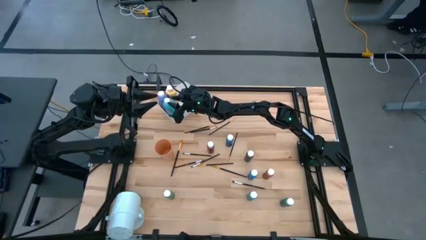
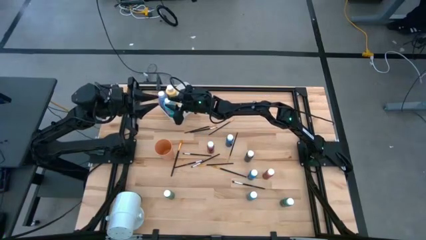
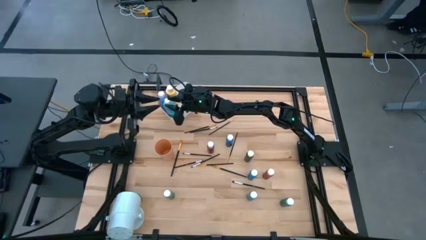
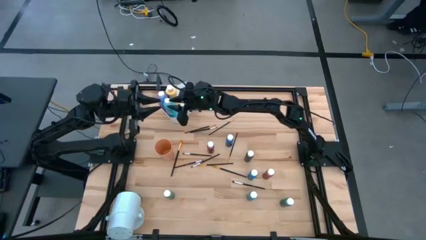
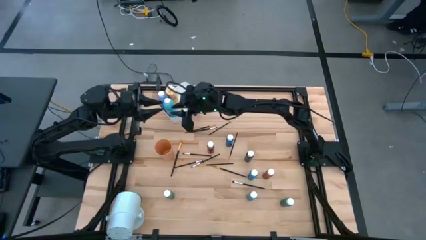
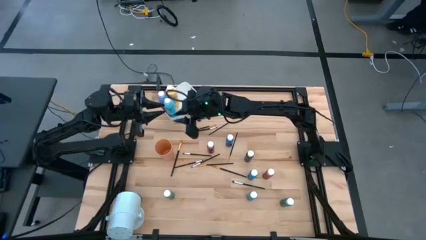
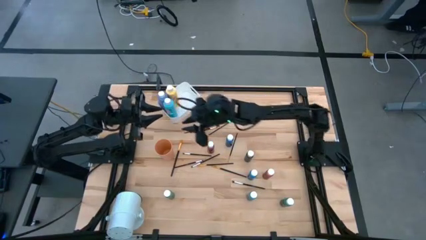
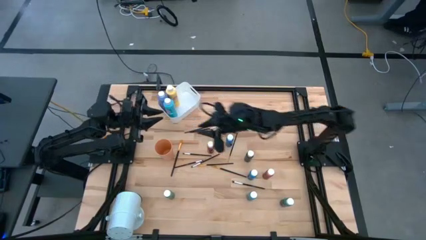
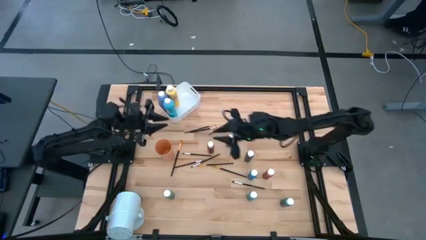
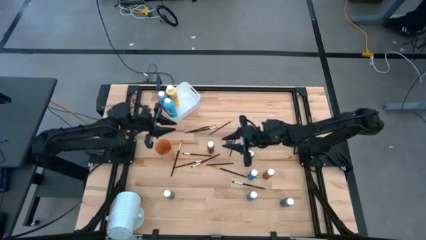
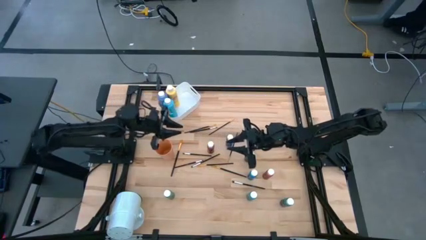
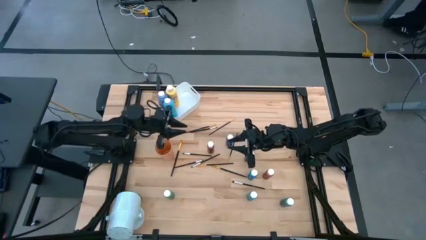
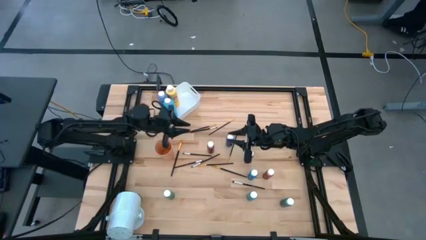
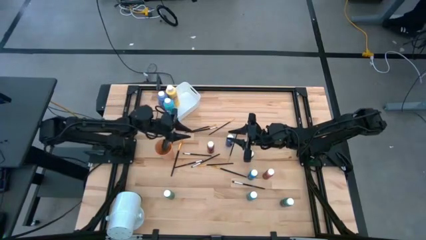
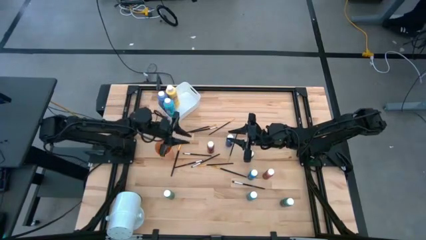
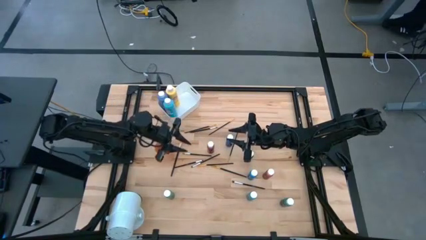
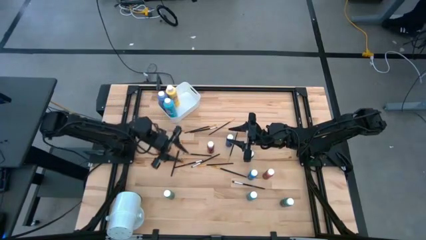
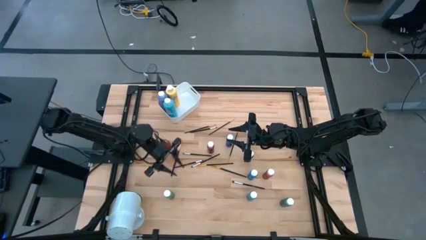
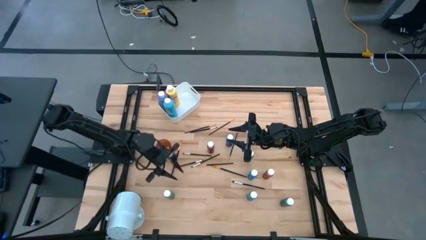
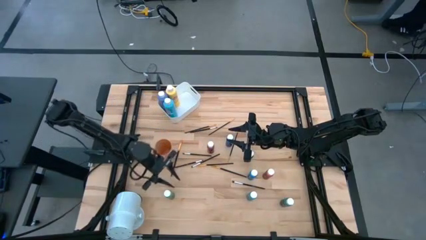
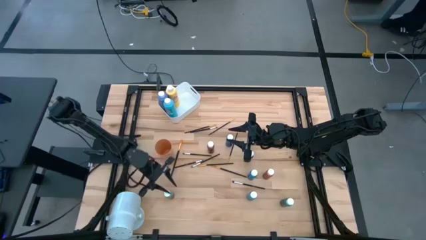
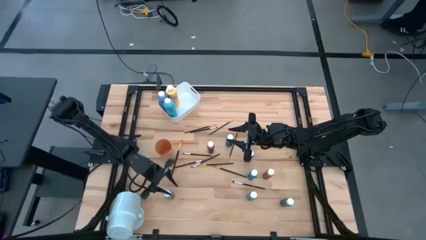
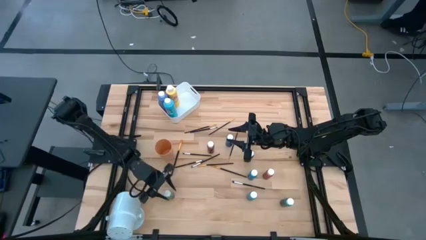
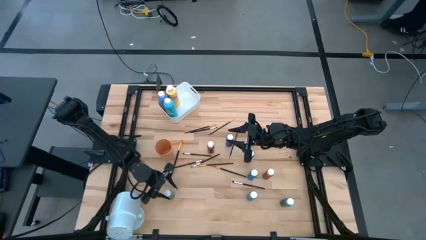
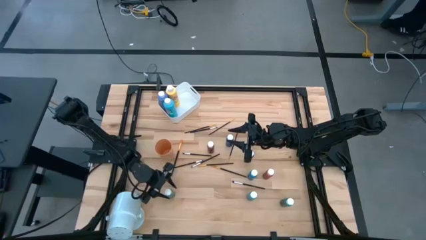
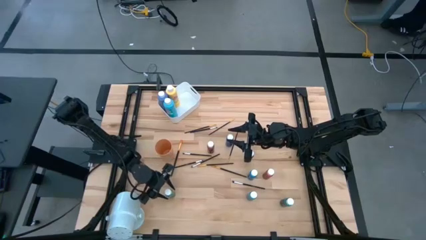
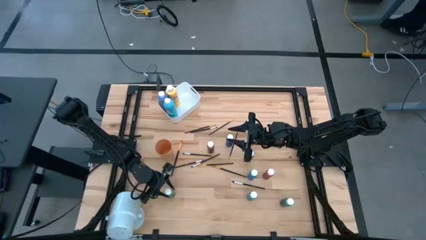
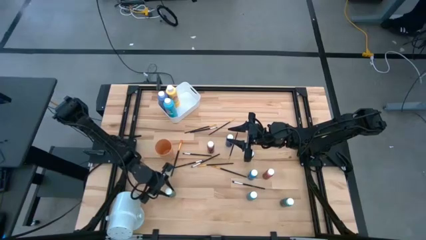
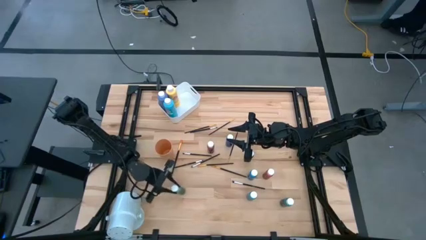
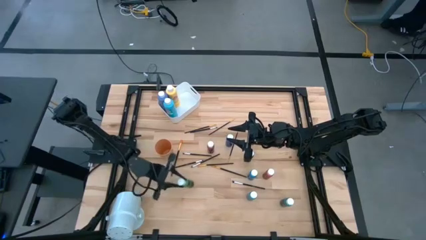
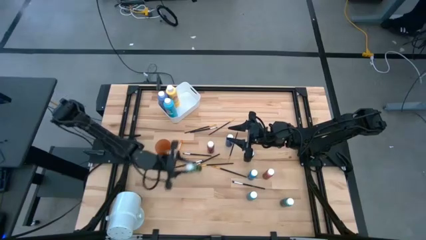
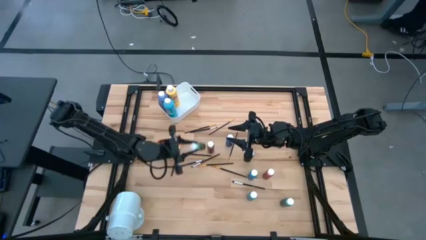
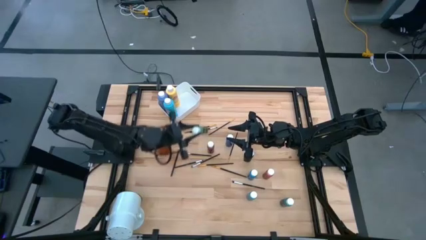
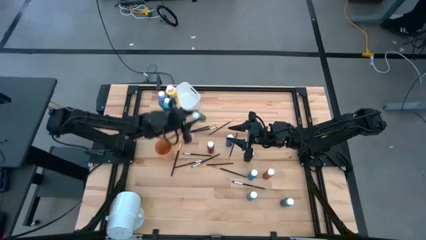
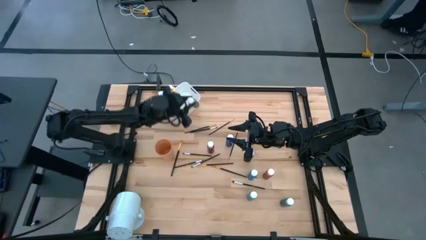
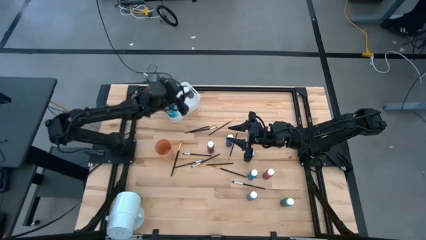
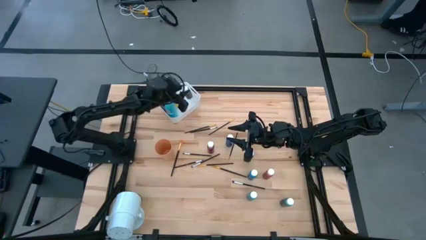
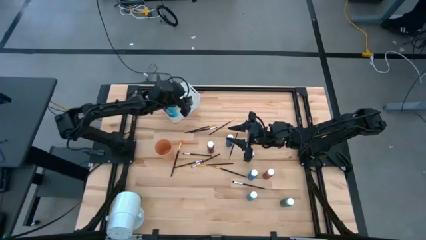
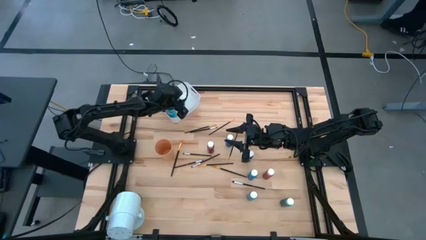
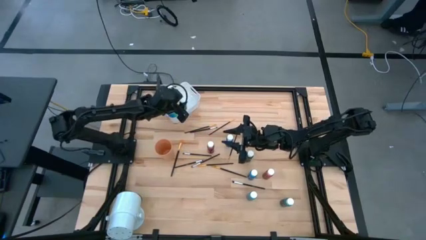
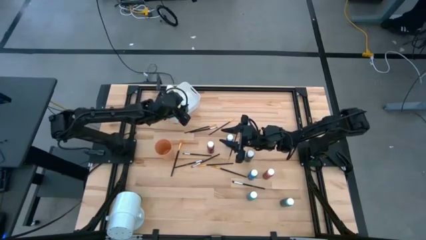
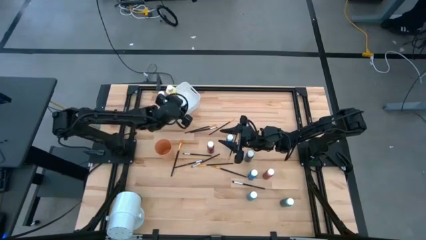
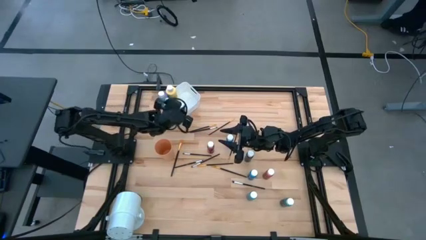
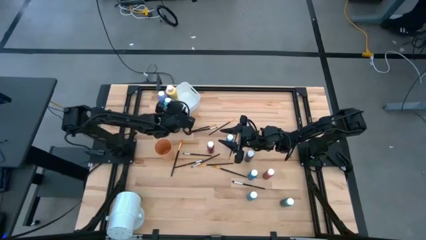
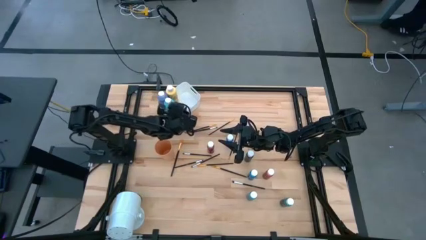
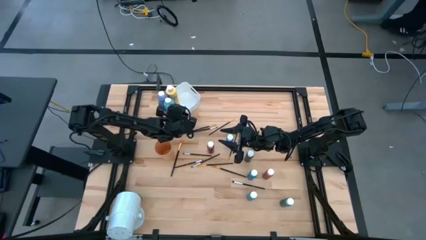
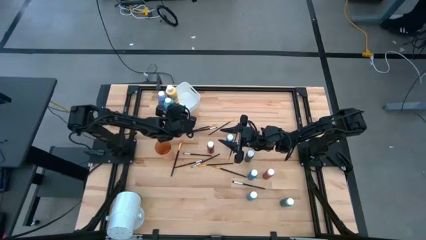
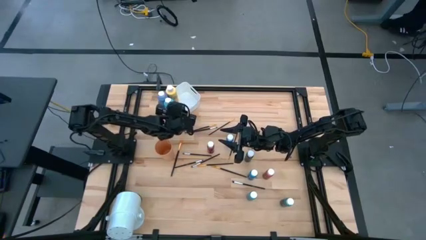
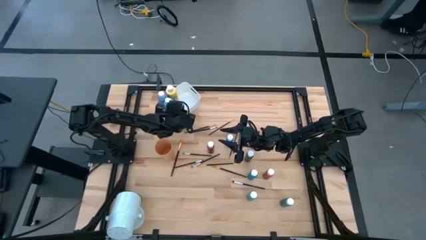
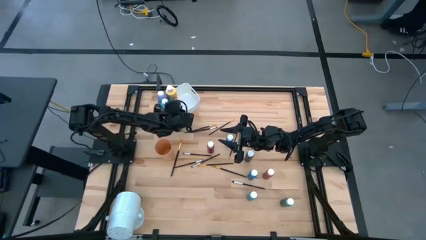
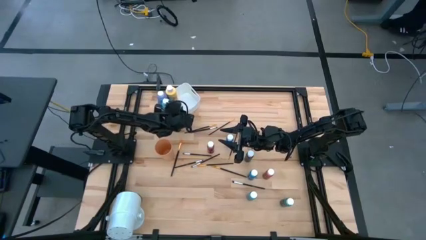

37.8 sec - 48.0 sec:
Task: Pick & Place Paint Supplies
Put the green paint bottle into the white bin
